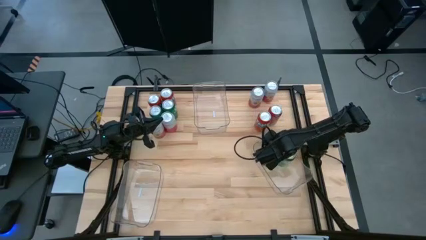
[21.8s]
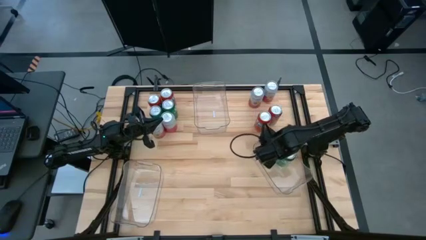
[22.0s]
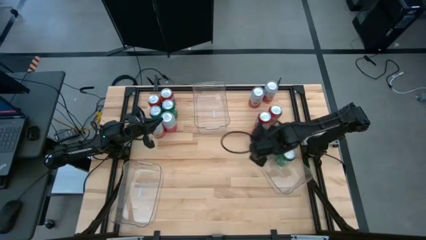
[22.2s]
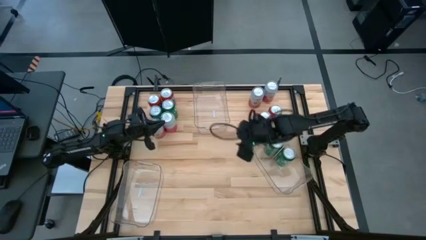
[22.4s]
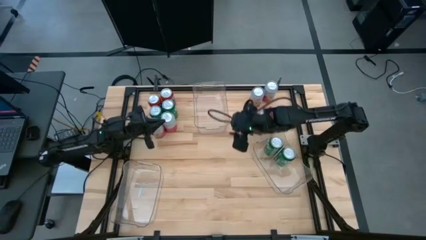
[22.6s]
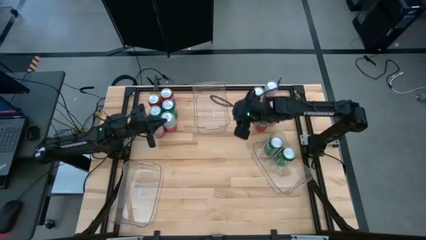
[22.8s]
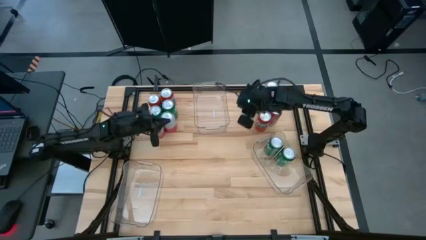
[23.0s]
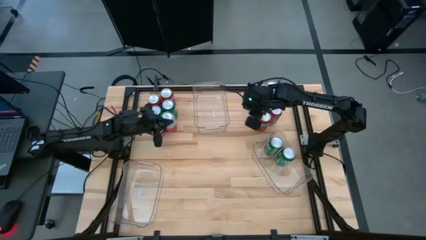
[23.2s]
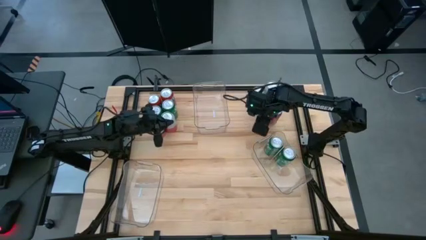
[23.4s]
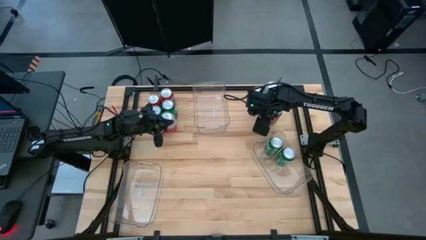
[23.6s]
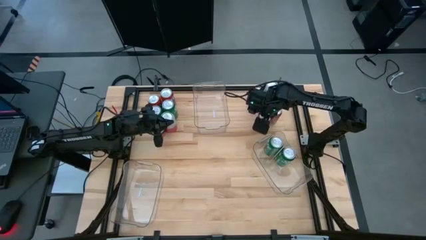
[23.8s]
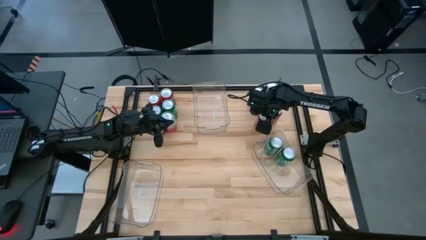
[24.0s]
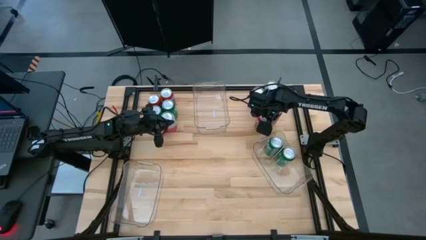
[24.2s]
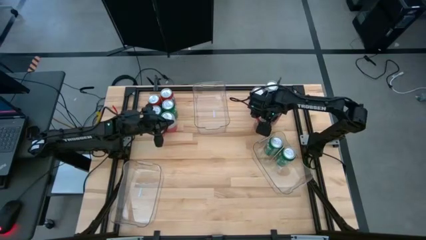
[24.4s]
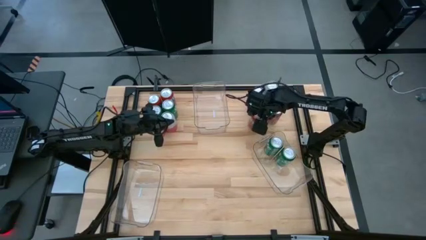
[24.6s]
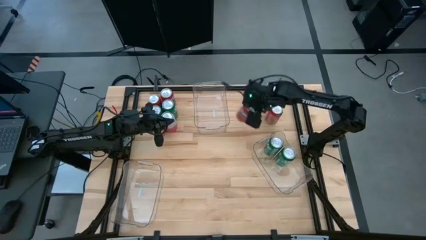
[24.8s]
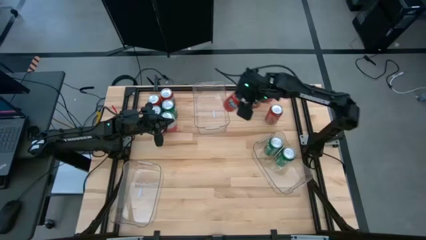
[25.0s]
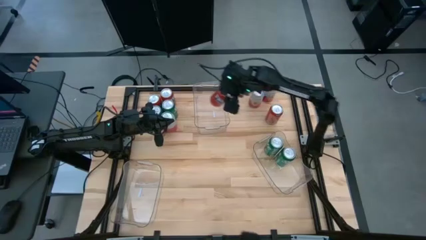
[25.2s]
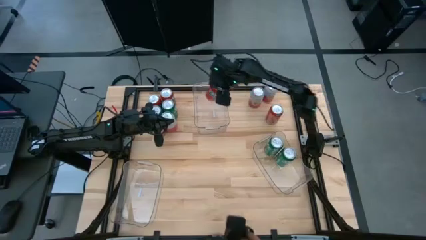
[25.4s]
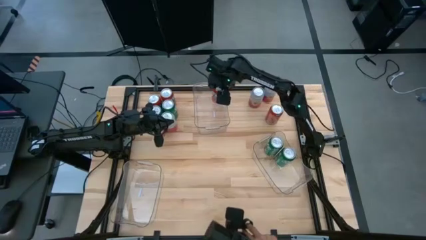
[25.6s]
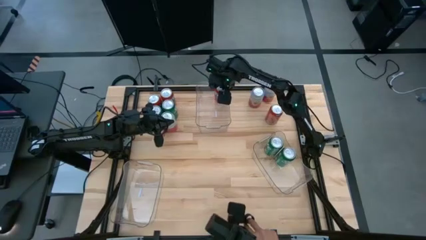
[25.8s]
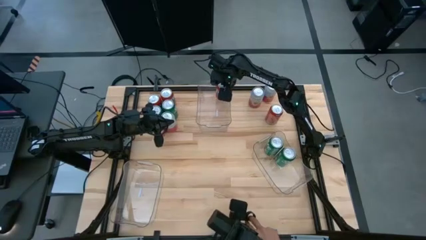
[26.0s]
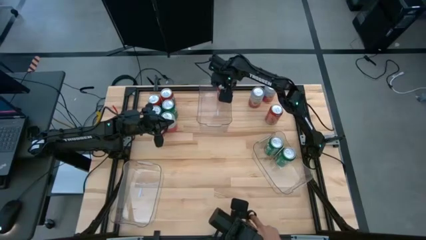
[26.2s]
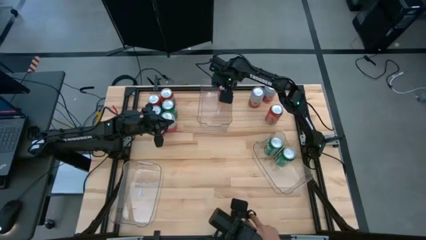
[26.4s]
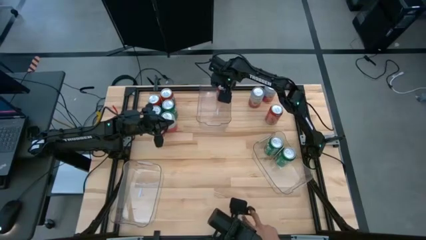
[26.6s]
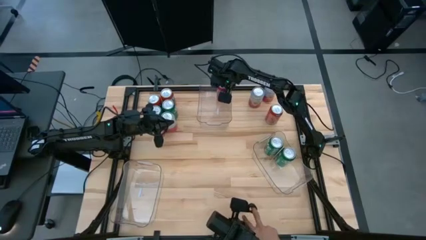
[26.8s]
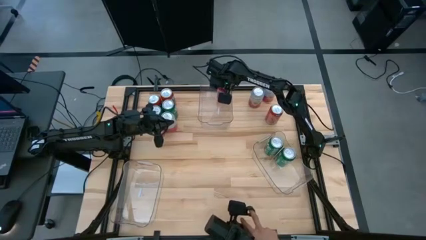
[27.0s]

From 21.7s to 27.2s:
Task: Sort soda cans
Put the orange soda can into the top transparent bin

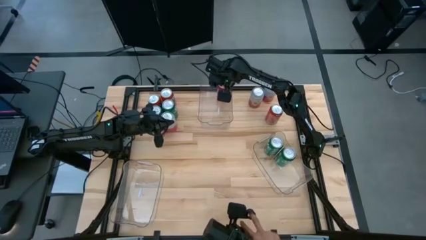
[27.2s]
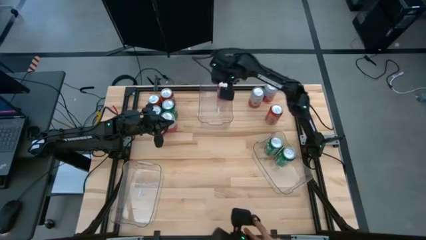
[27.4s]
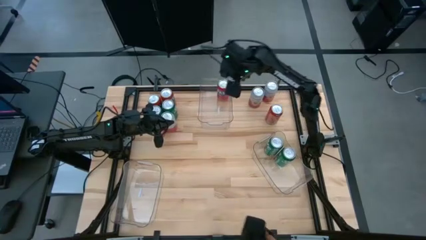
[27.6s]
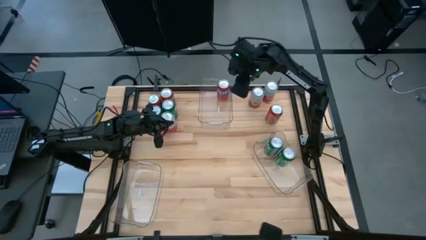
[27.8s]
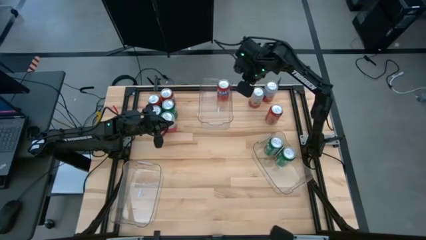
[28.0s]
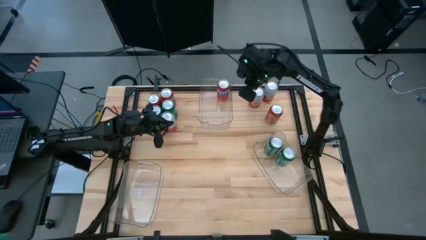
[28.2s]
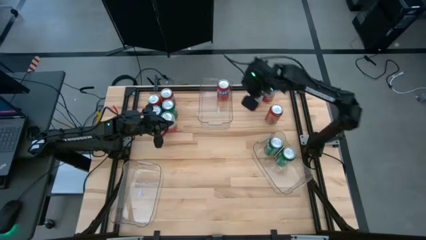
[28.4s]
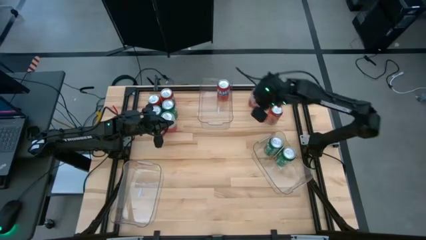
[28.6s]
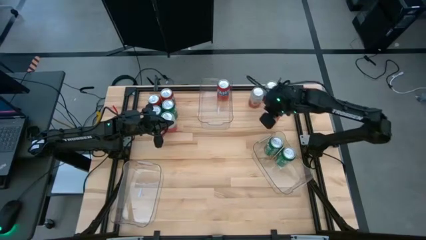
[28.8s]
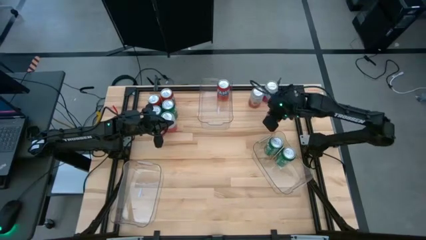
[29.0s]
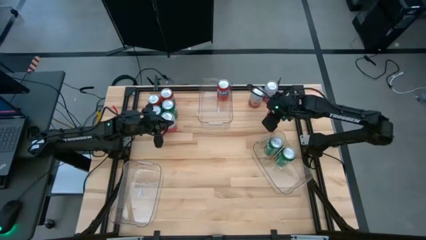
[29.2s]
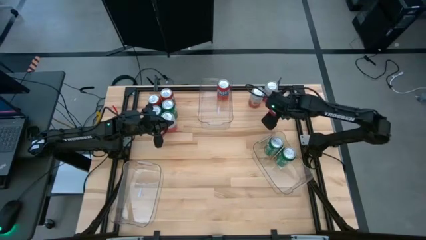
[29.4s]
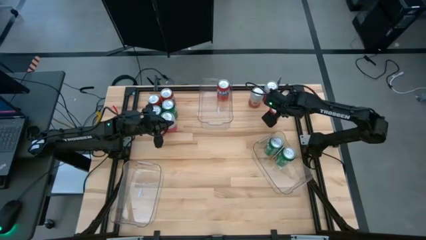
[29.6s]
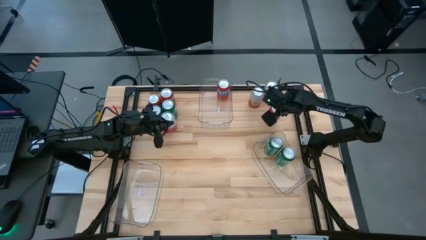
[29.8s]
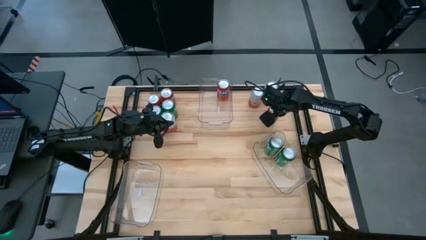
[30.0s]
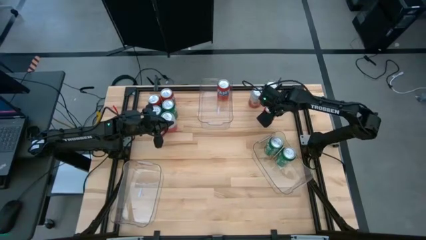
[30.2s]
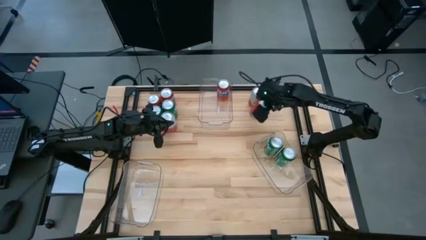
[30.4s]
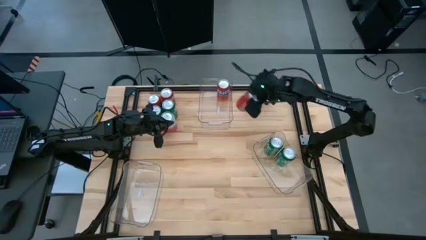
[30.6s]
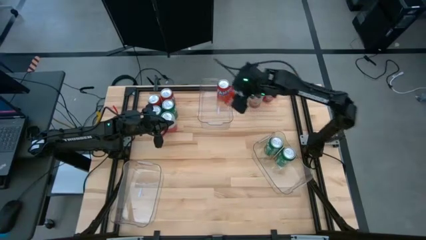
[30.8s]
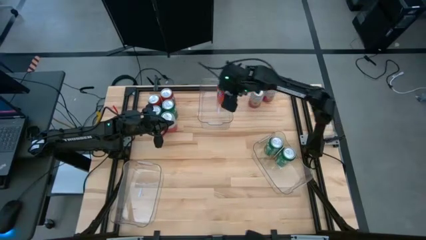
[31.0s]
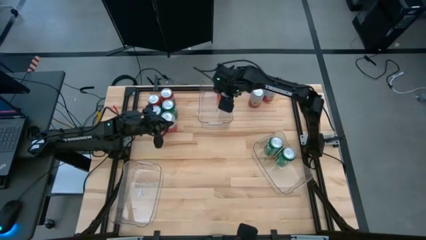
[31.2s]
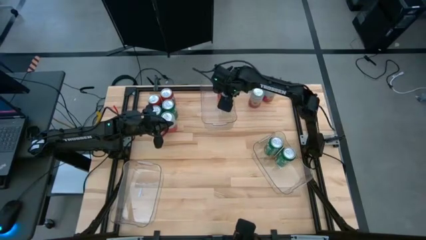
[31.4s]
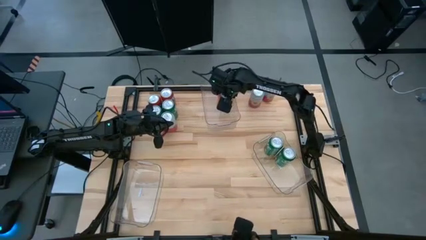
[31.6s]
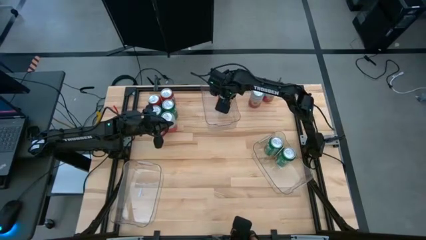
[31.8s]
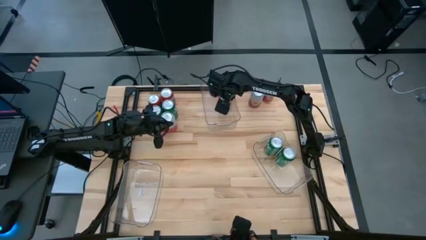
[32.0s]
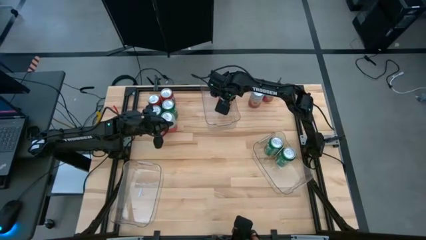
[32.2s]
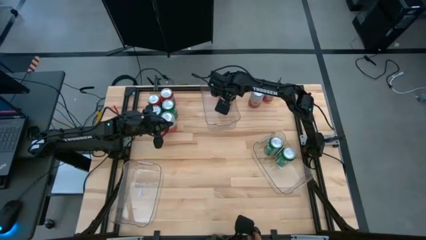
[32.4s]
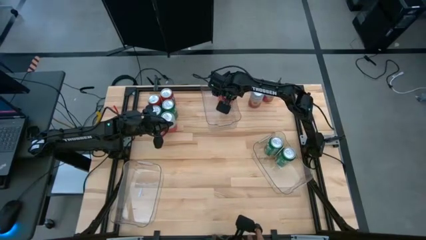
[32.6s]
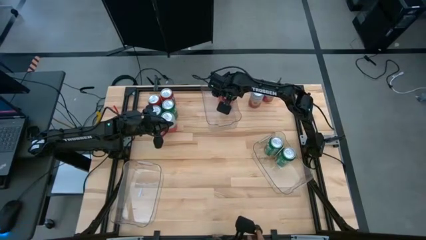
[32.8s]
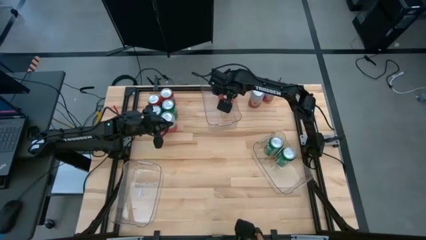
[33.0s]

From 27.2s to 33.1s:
Put the orange soda can into the top transparent bin

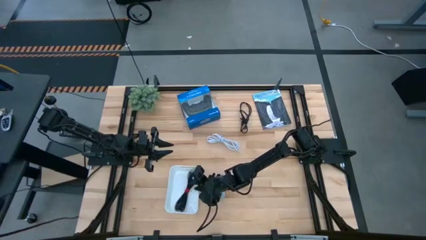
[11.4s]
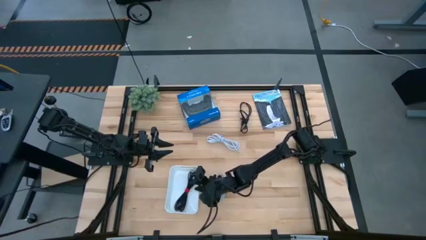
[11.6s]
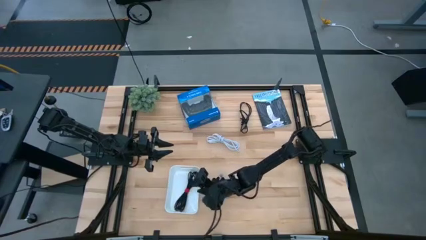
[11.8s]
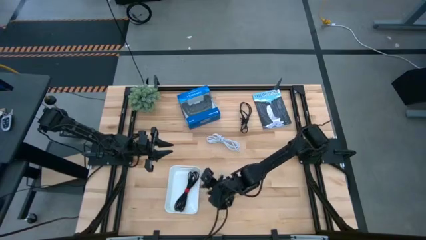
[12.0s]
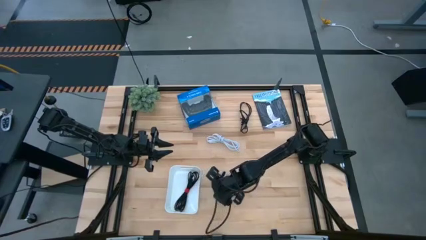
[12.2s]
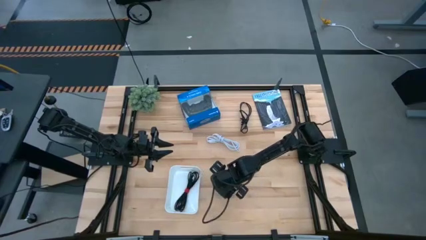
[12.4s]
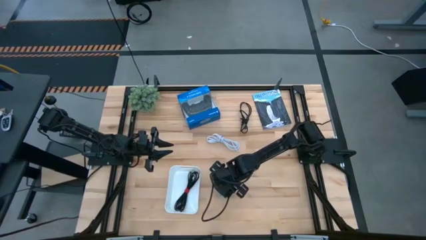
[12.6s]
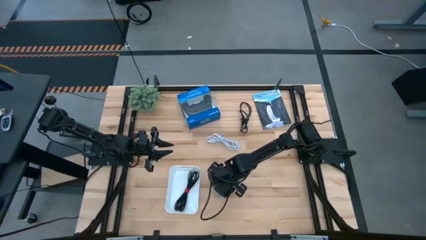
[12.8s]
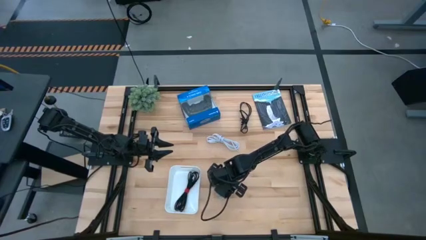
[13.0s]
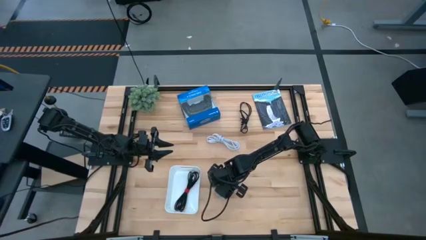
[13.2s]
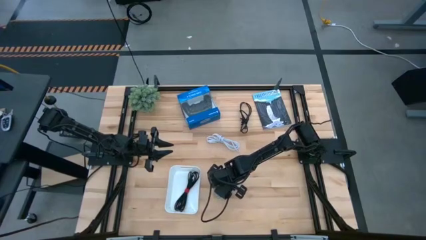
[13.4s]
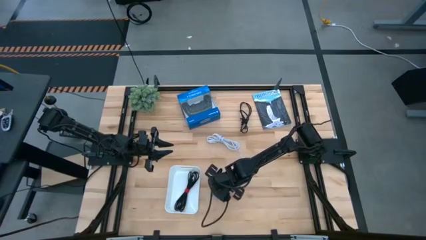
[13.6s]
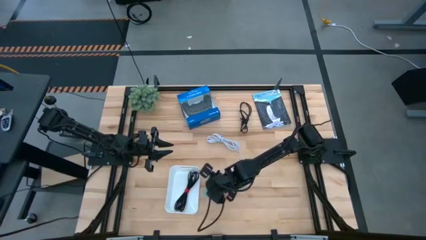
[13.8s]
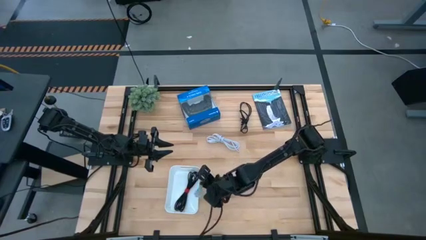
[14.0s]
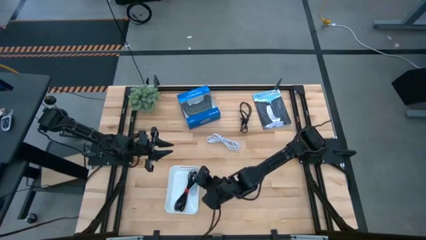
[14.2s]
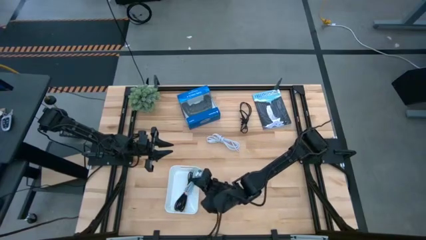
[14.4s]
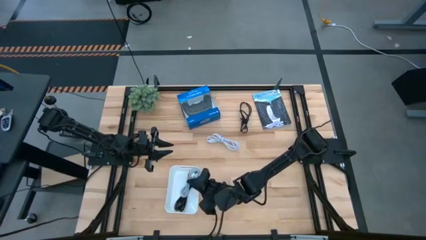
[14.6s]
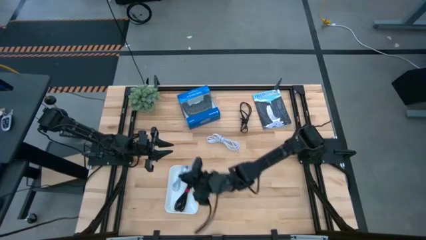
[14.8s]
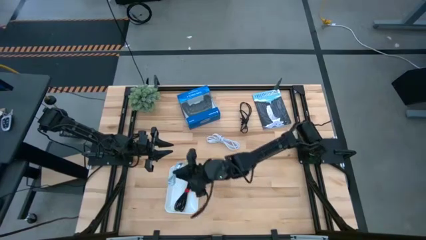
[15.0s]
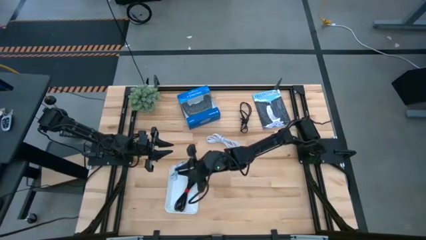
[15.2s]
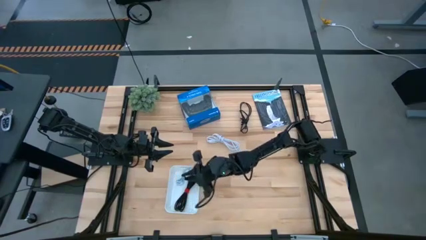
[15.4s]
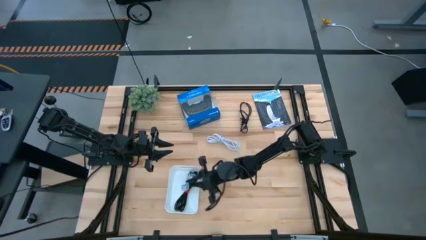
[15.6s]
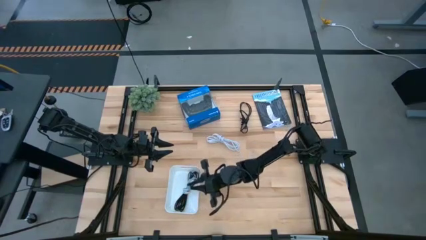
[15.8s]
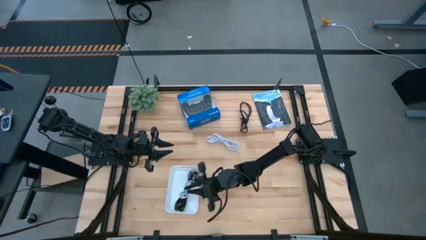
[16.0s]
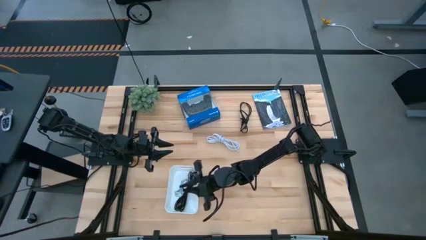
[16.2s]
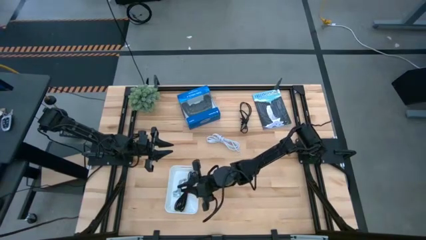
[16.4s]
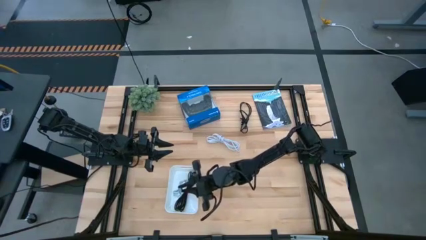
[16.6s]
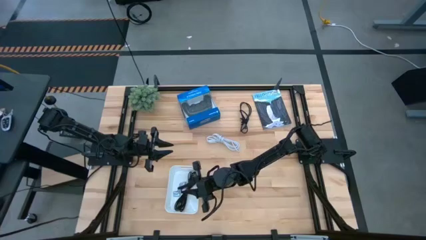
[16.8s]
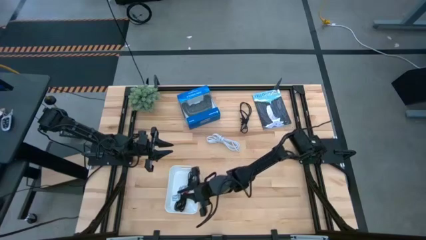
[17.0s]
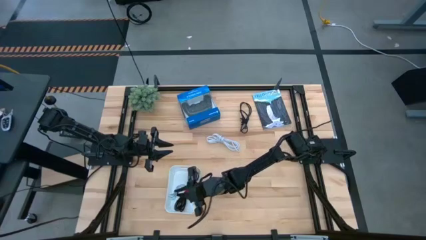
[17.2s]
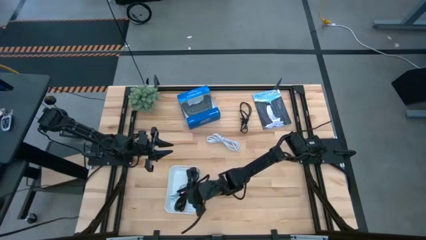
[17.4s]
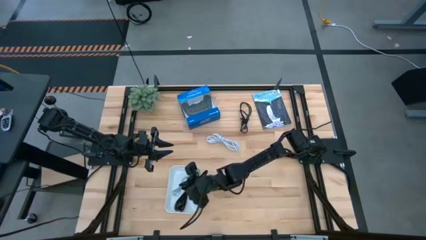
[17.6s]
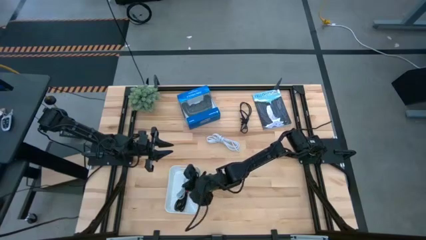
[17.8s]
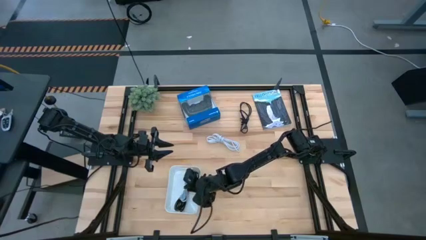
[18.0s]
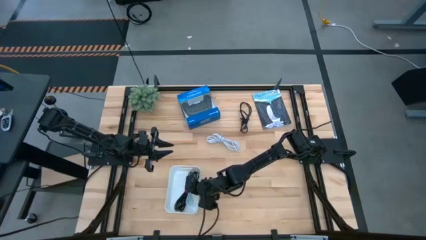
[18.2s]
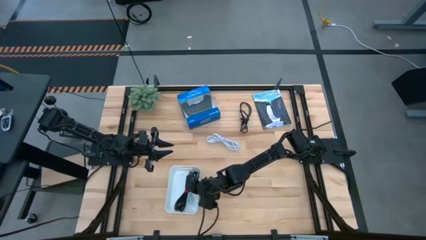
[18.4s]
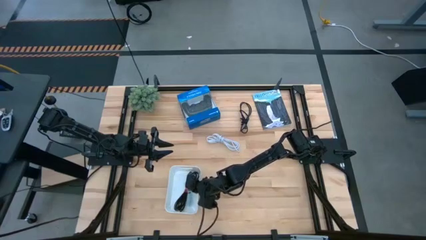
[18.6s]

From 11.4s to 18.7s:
Task: Pick and place USB-C Cables
Put the blue charger cable into the white bin
